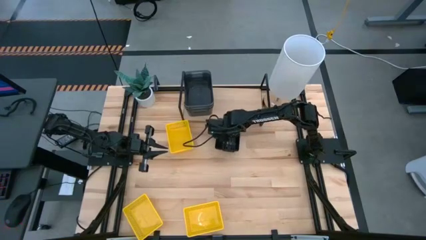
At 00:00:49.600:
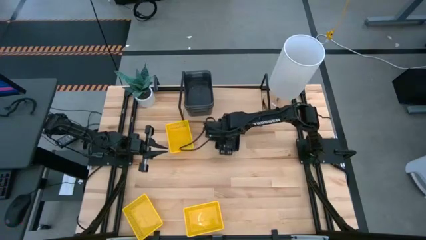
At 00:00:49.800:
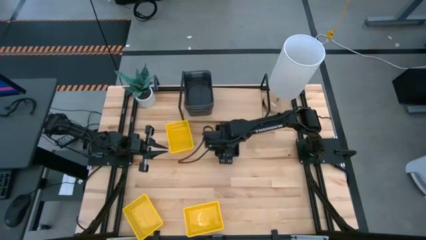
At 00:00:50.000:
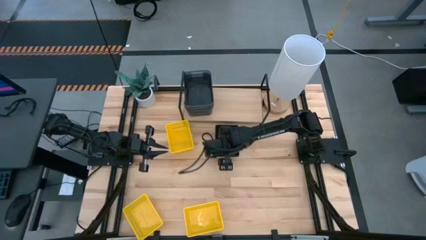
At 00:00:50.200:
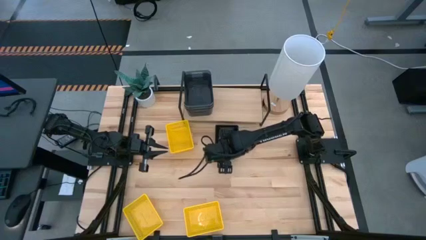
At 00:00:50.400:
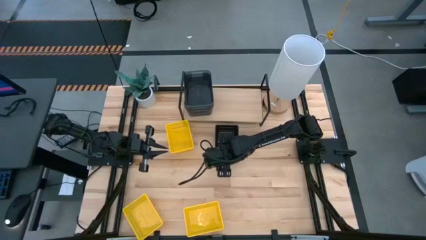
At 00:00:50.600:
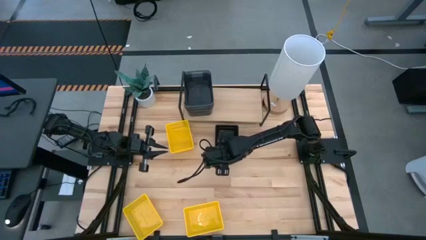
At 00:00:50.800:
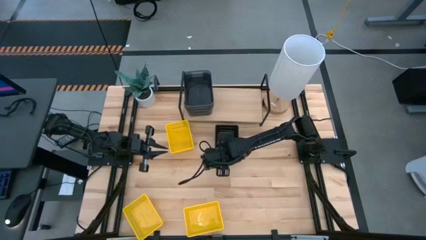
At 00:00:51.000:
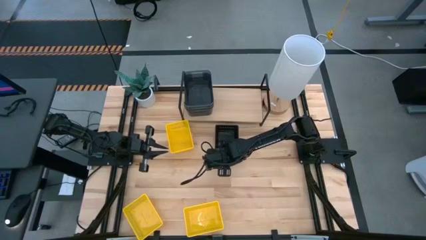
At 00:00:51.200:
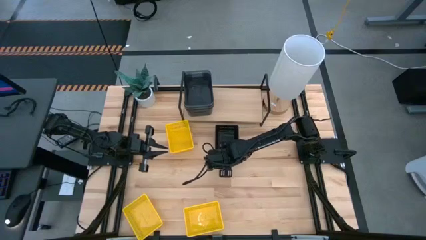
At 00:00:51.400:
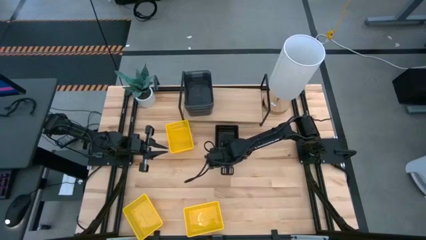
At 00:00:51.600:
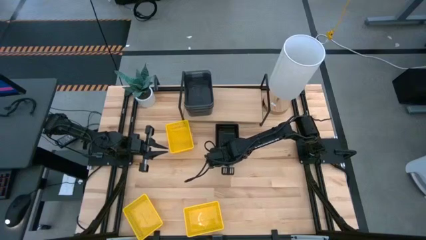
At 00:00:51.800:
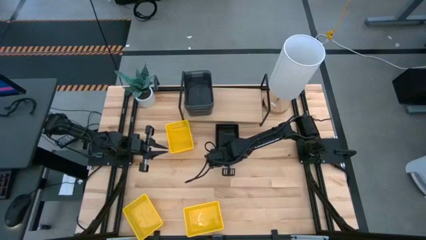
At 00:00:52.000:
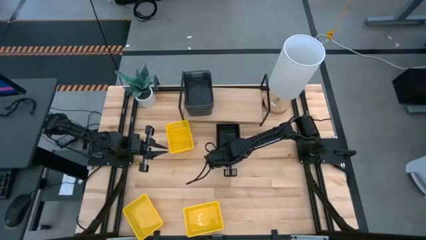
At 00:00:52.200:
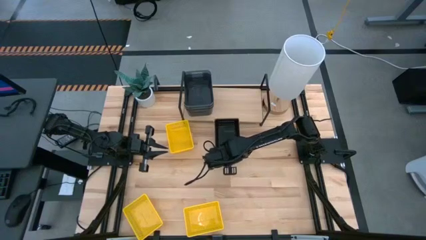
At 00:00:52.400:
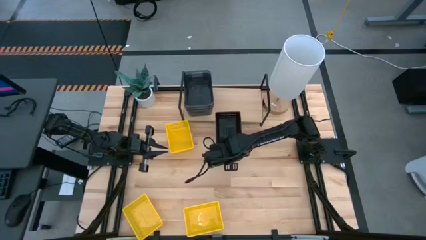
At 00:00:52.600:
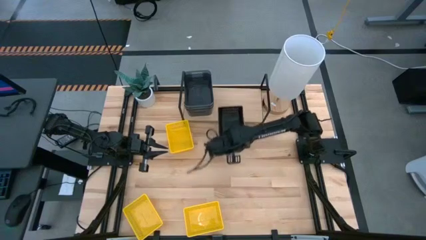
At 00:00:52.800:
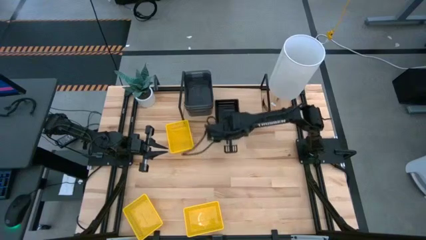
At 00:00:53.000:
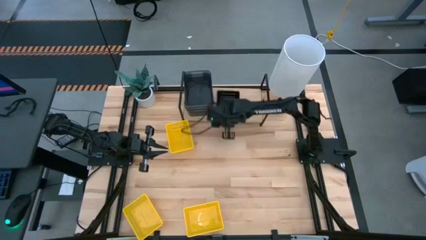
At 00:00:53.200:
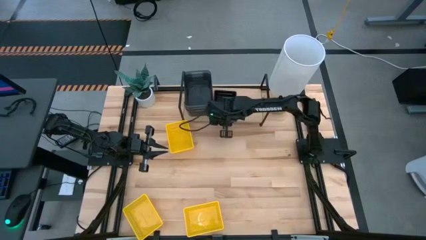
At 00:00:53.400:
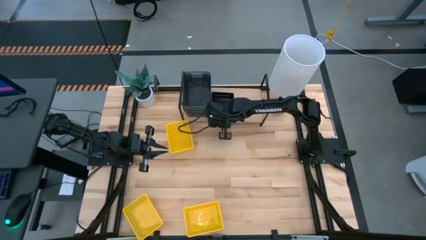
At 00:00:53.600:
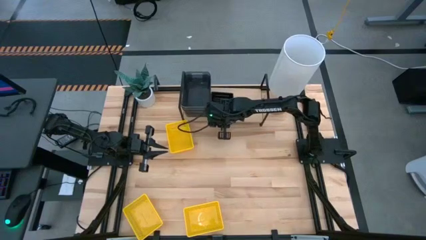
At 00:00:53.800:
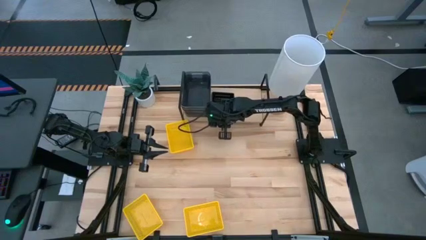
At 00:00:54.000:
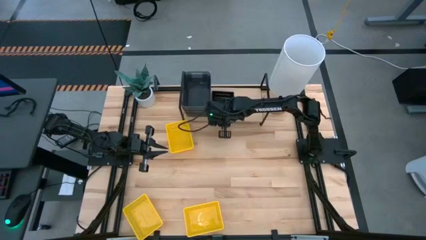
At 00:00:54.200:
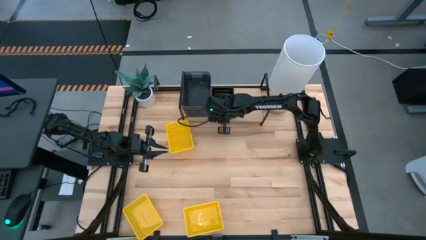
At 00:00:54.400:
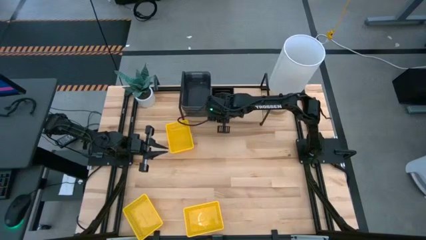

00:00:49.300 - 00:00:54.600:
Task: Stack baskets on shelf by color
Put the stacked black bins on the shelf

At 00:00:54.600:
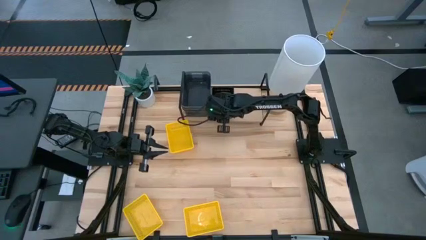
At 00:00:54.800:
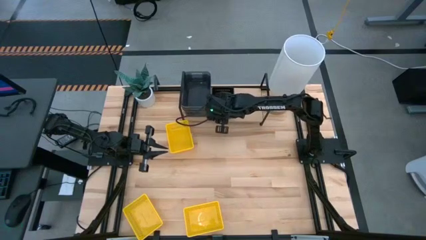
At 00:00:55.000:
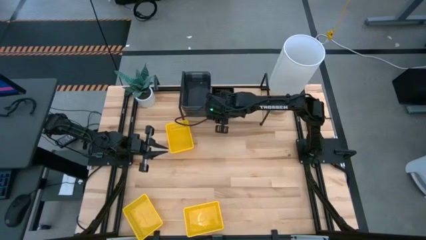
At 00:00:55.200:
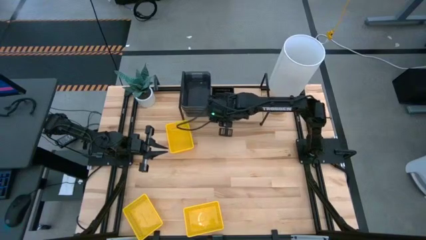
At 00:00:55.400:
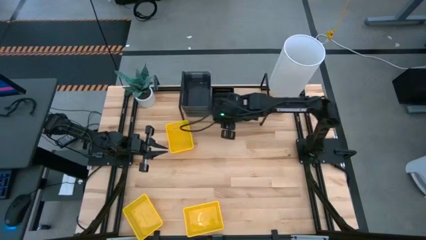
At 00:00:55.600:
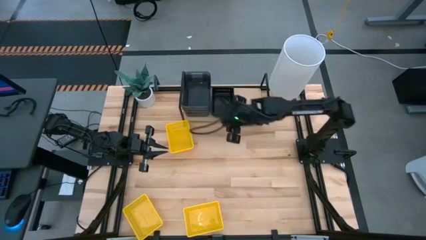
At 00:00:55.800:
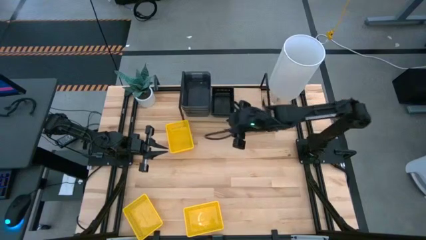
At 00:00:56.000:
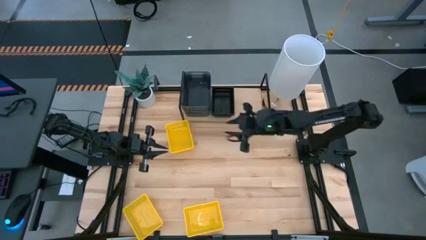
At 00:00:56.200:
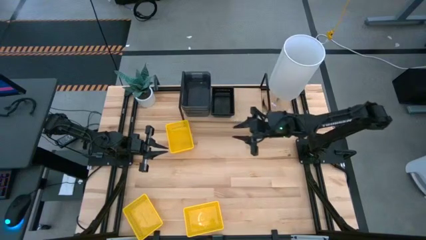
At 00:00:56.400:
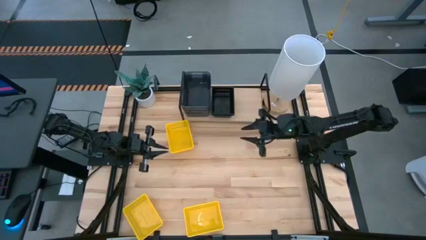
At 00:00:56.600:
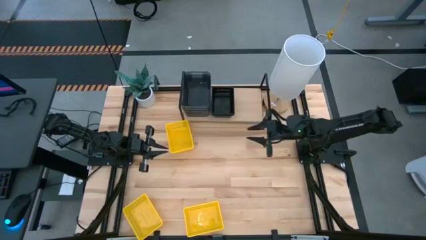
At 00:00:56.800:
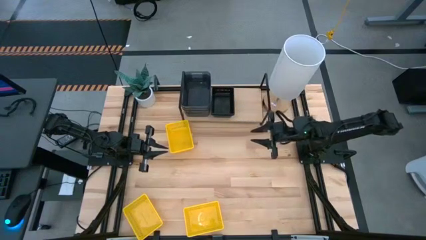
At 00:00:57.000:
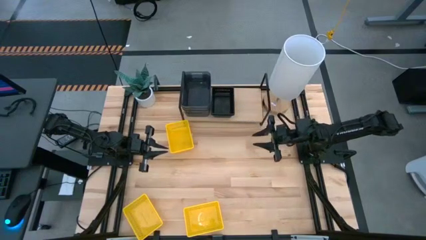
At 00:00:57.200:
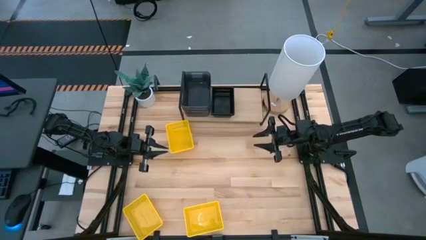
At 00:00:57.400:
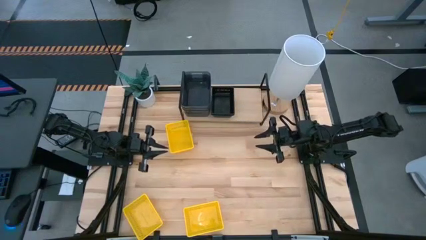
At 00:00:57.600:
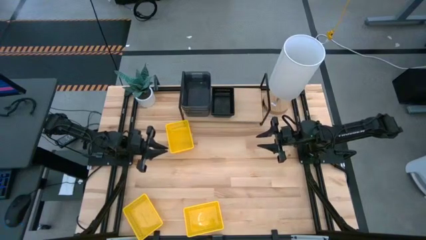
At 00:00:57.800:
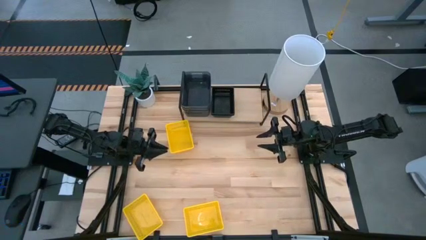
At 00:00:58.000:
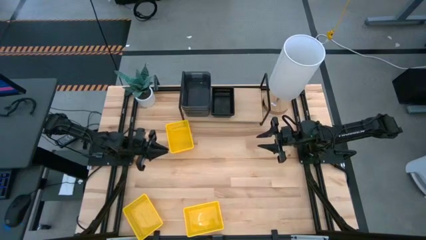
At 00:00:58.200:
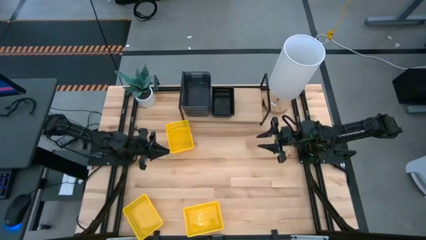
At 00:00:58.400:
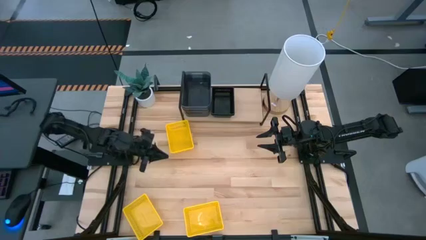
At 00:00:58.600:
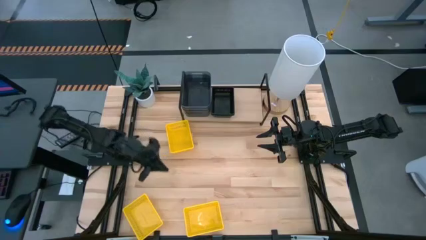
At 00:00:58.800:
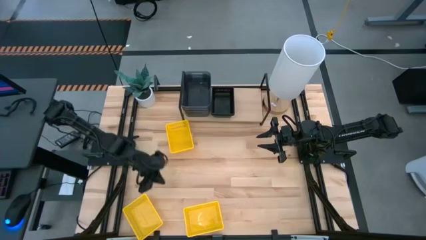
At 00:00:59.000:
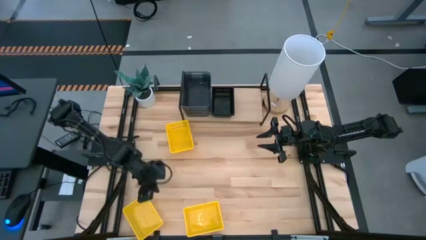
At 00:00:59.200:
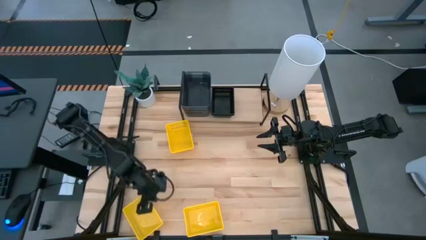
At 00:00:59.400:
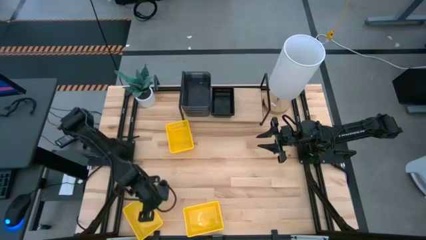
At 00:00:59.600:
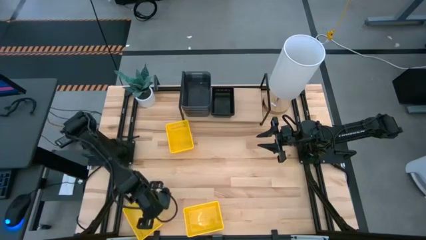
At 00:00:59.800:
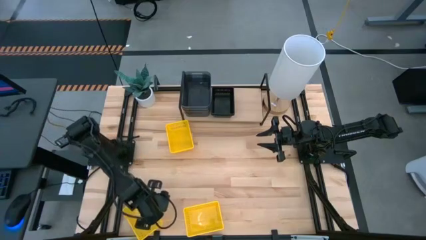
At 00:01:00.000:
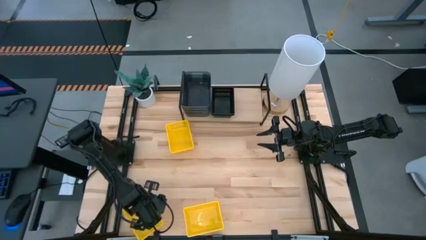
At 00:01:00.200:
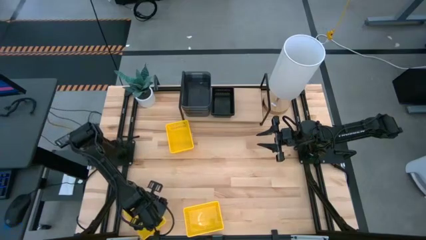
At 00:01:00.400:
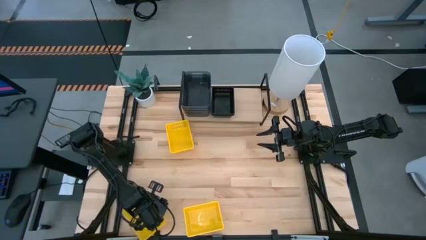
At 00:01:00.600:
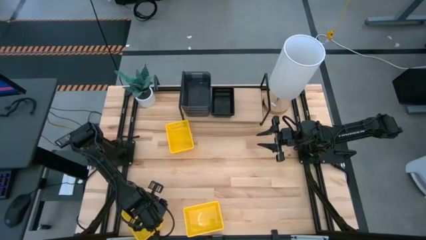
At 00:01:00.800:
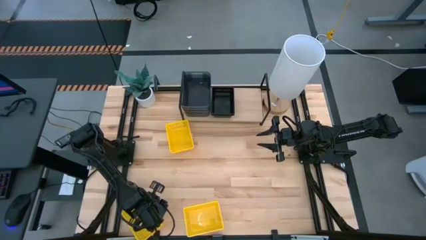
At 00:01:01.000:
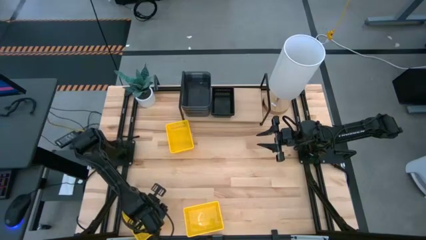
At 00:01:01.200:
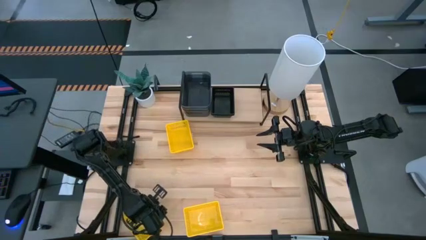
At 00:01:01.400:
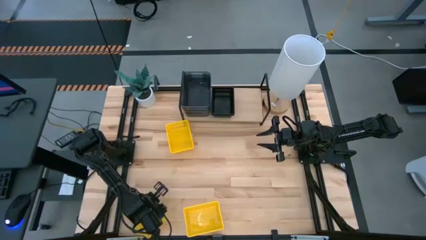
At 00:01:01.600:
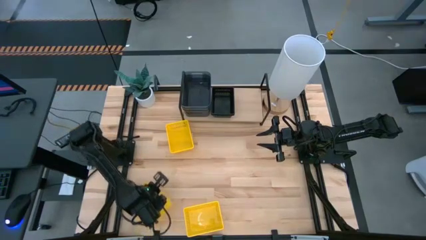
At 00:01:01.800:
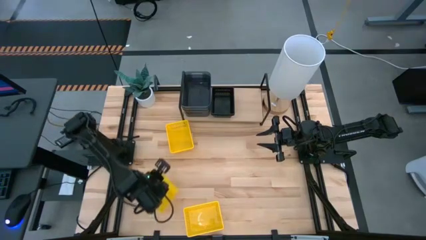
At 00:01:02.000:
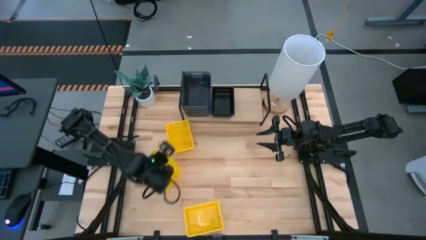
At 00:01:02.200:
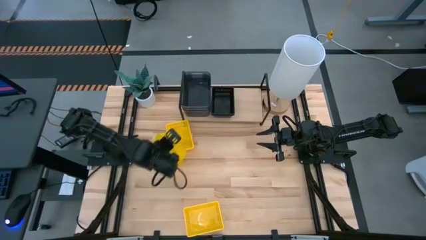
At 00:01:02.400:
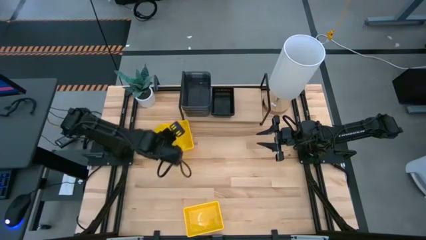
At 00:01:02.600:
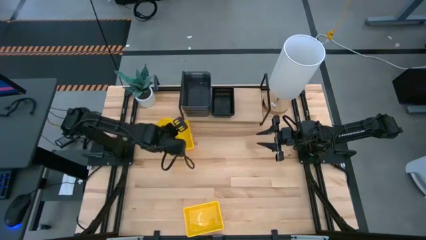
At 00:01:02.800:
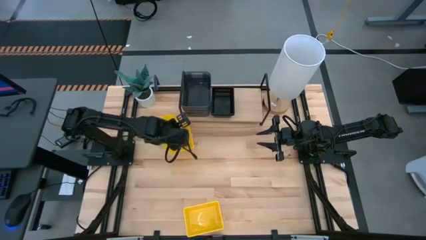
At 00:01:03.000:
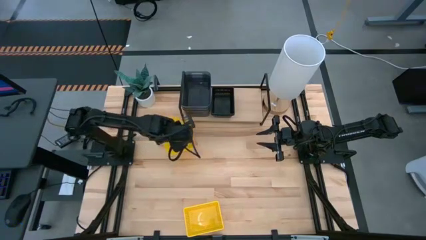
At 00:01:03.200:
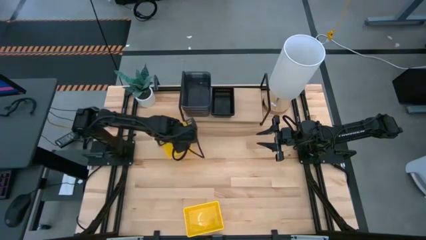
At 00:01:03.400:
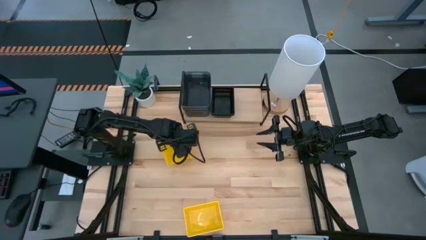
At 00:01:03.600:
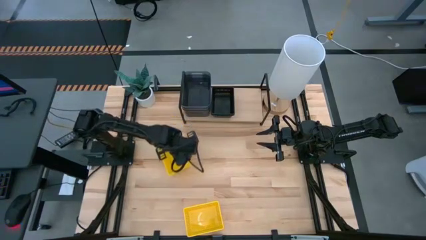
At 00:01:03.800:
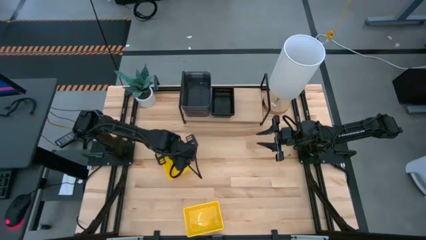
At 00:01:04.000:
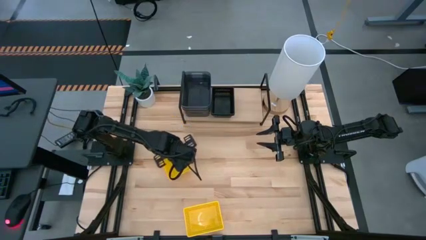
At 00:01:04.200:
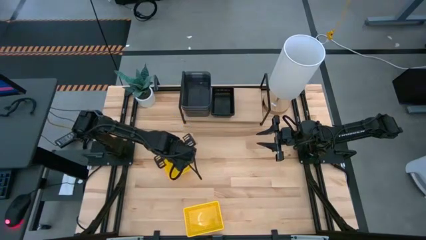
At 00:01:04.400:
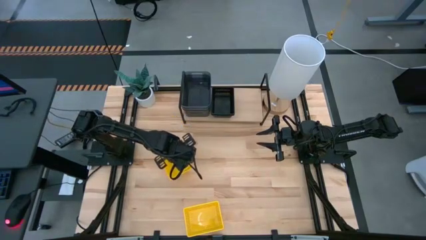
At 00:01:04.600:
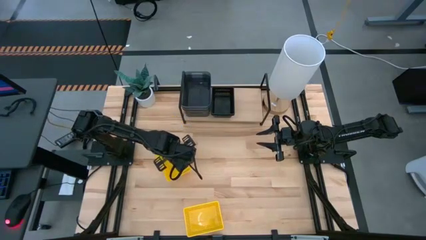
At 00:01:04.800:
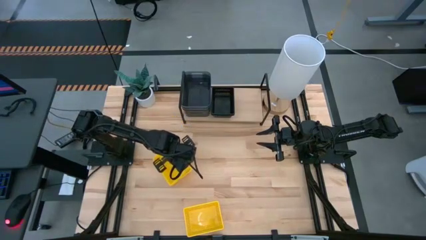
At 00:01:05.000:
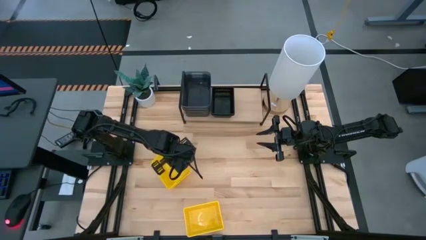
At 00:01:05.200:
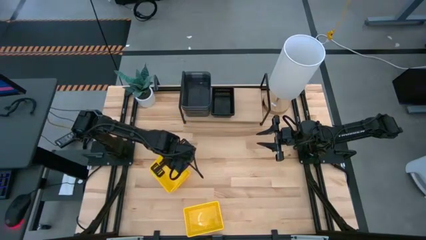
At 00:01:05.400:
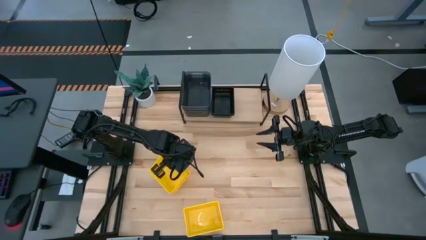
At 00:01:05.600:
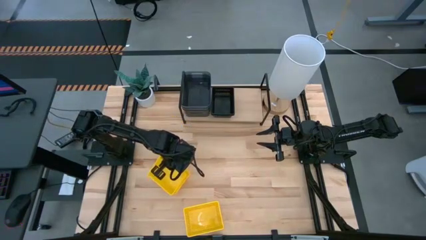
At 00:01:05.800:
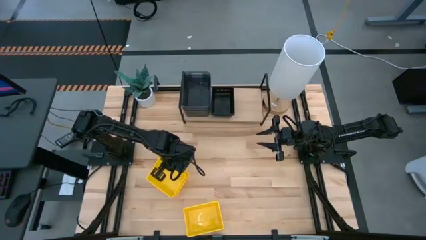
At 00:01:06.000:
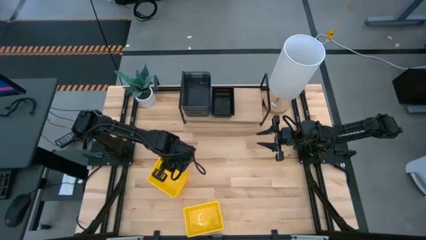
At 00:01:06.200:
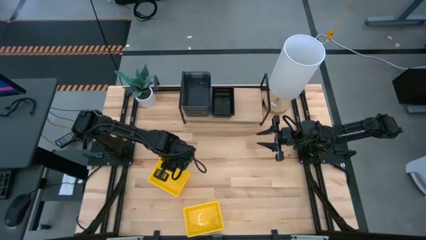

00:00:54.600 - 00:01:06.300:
Stack the bottom left yellow bin on the top yellow bin
